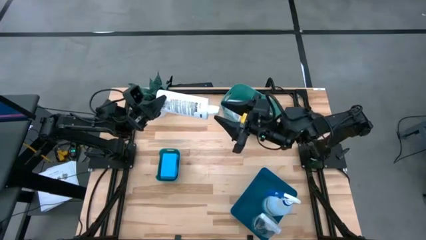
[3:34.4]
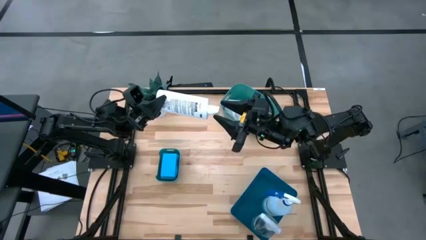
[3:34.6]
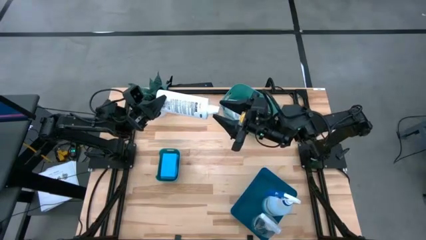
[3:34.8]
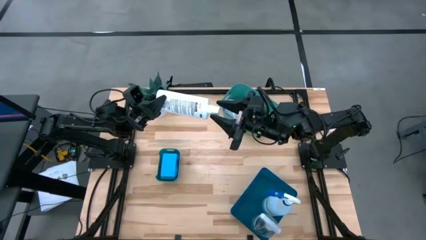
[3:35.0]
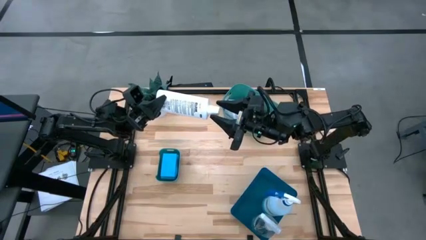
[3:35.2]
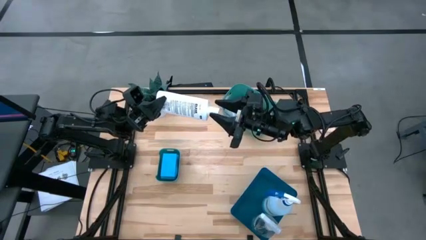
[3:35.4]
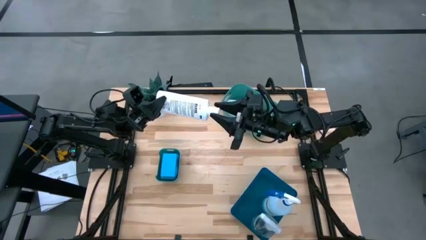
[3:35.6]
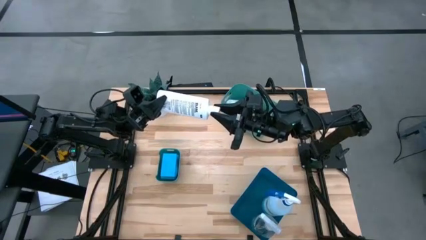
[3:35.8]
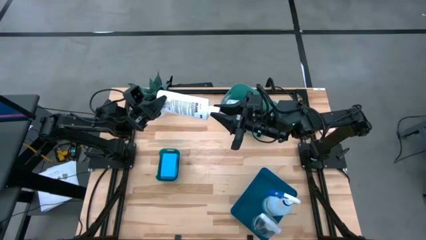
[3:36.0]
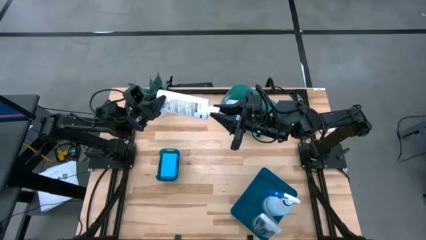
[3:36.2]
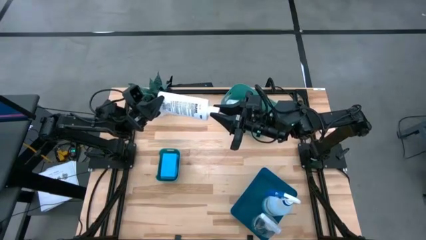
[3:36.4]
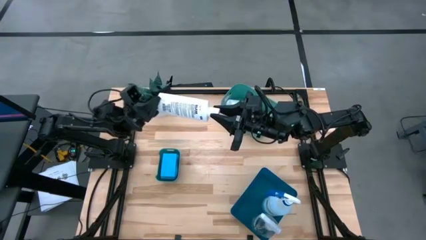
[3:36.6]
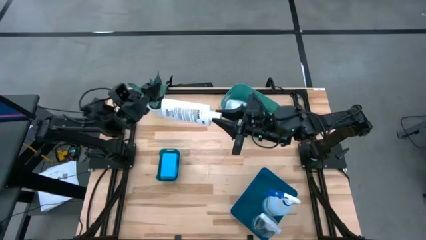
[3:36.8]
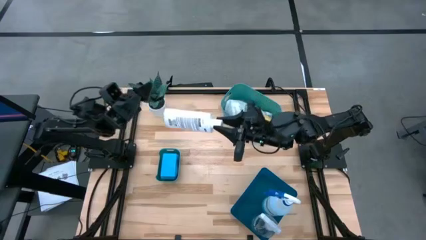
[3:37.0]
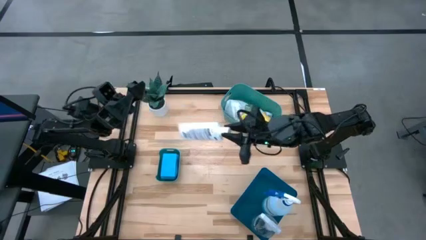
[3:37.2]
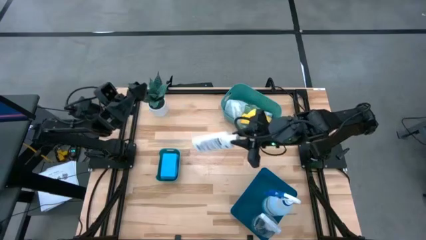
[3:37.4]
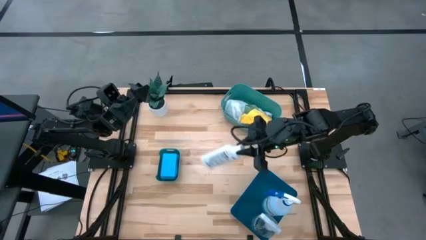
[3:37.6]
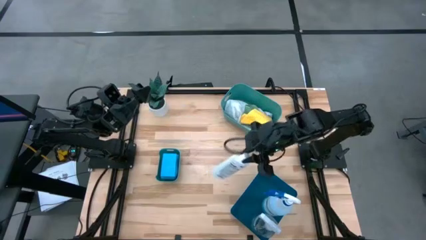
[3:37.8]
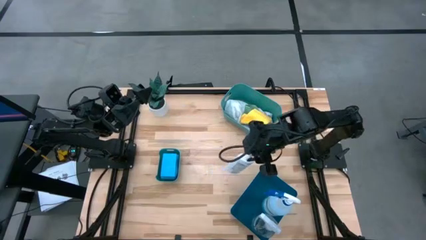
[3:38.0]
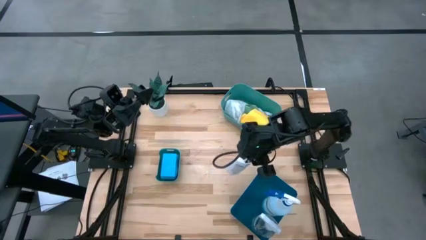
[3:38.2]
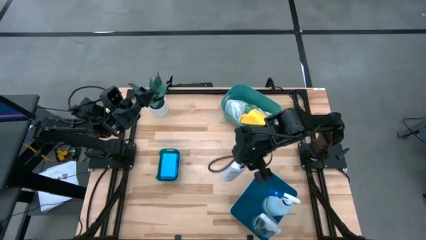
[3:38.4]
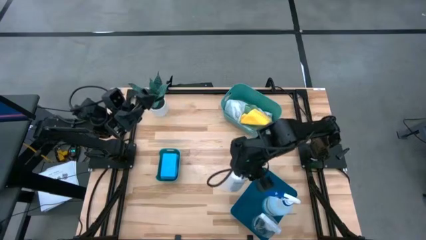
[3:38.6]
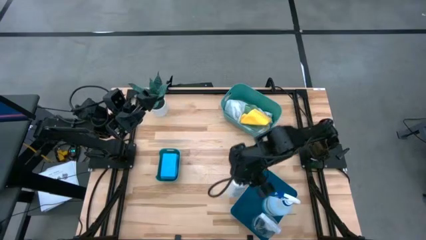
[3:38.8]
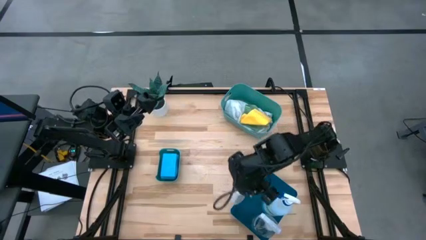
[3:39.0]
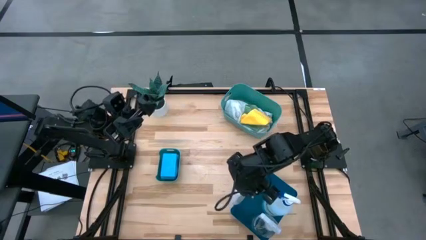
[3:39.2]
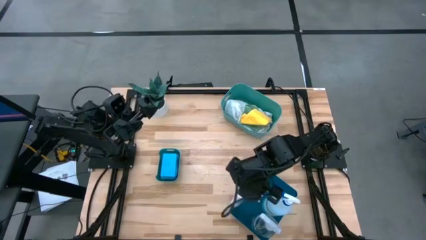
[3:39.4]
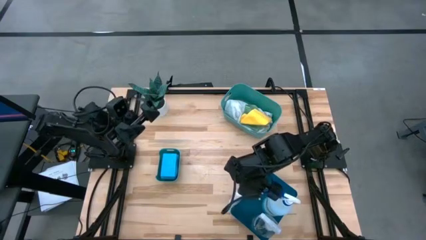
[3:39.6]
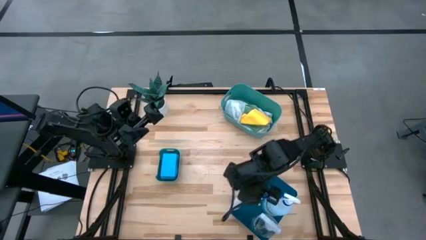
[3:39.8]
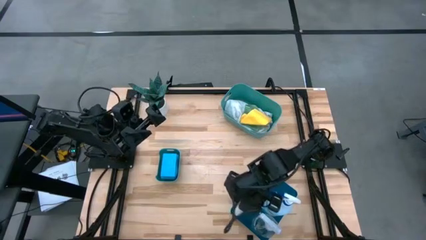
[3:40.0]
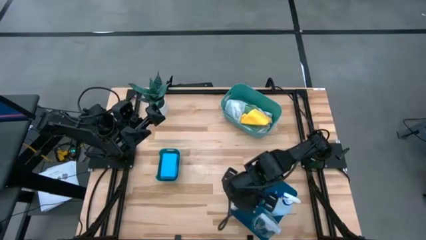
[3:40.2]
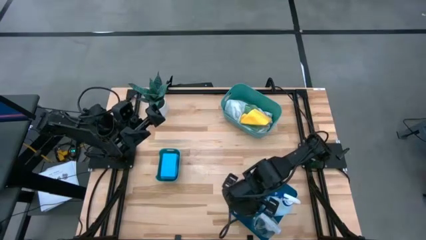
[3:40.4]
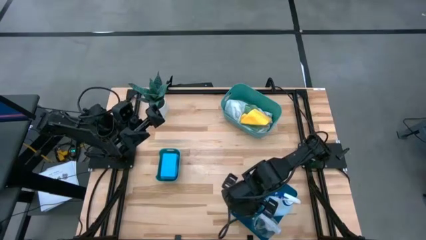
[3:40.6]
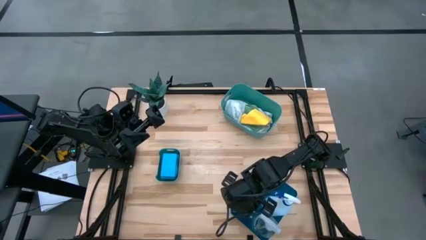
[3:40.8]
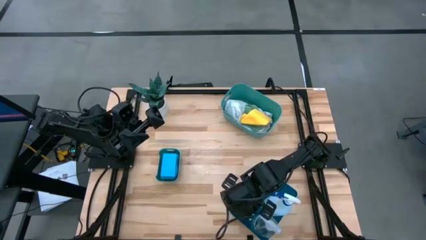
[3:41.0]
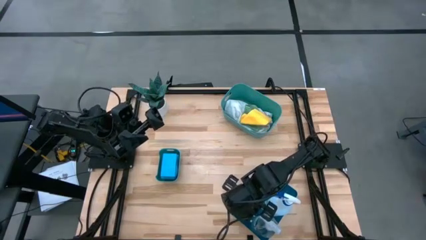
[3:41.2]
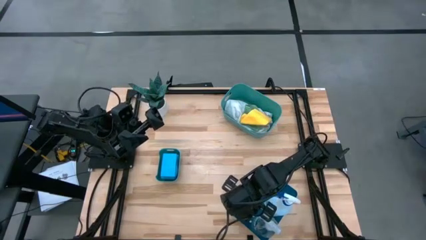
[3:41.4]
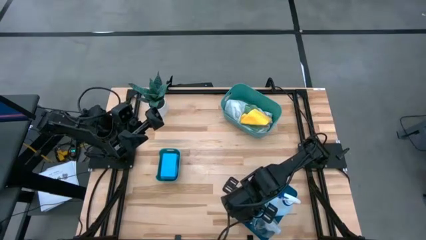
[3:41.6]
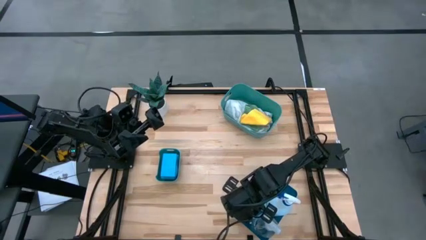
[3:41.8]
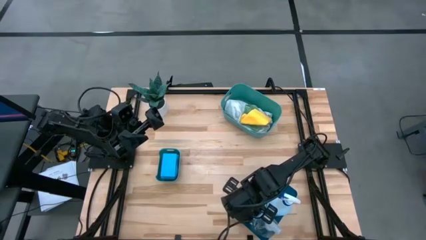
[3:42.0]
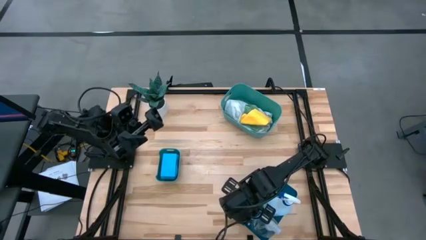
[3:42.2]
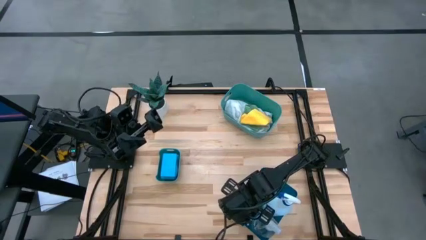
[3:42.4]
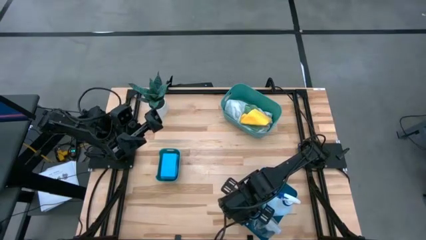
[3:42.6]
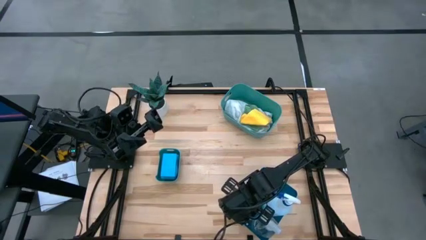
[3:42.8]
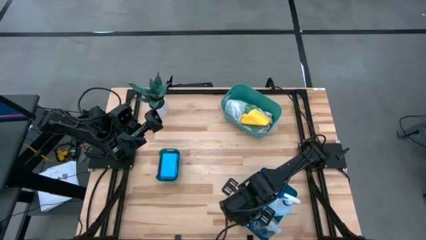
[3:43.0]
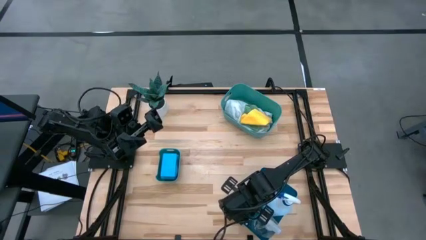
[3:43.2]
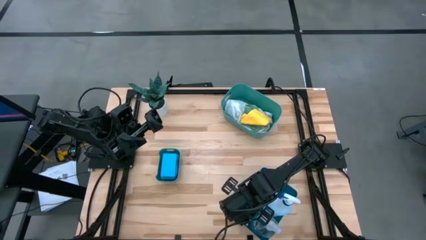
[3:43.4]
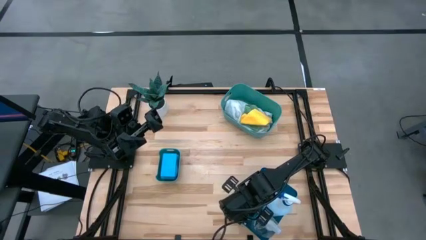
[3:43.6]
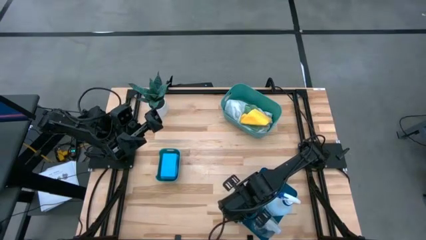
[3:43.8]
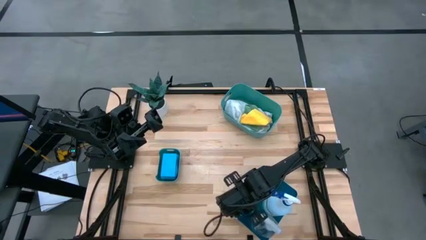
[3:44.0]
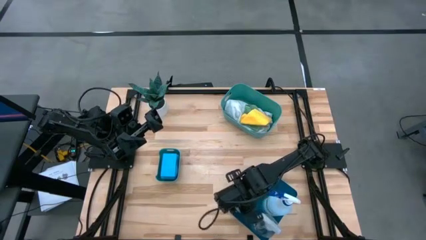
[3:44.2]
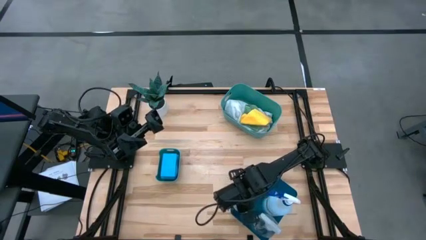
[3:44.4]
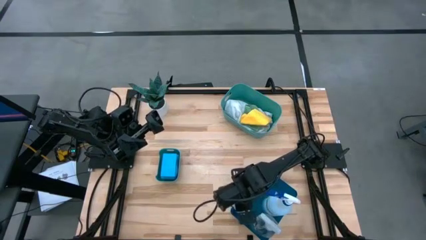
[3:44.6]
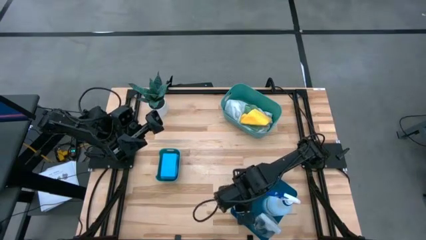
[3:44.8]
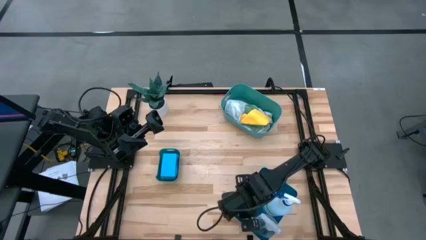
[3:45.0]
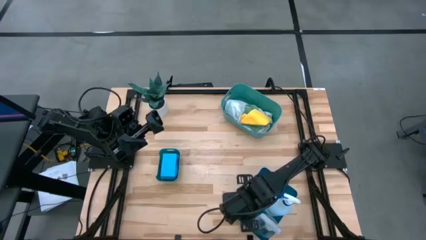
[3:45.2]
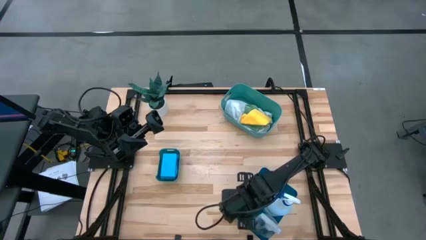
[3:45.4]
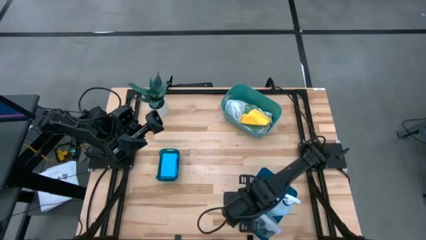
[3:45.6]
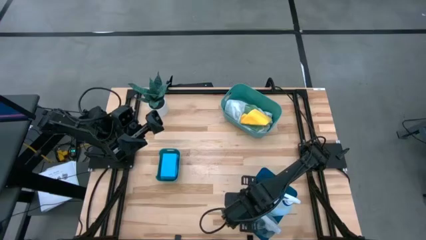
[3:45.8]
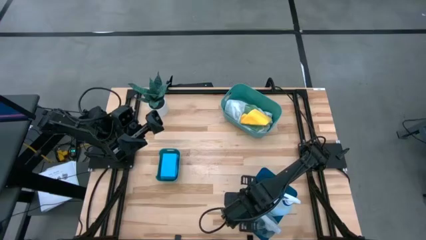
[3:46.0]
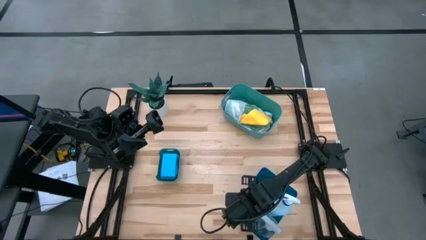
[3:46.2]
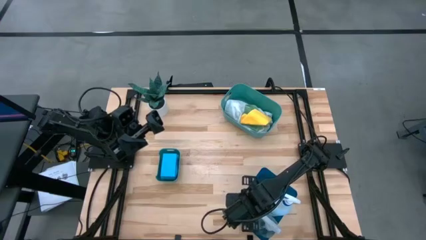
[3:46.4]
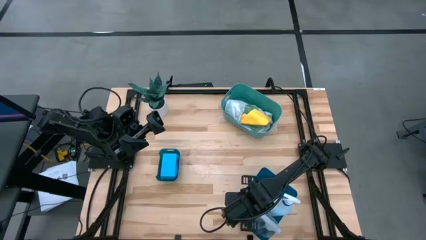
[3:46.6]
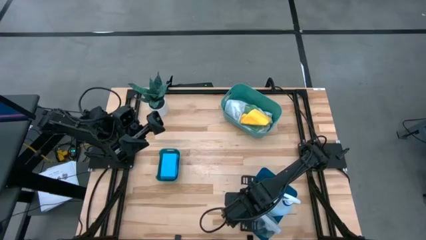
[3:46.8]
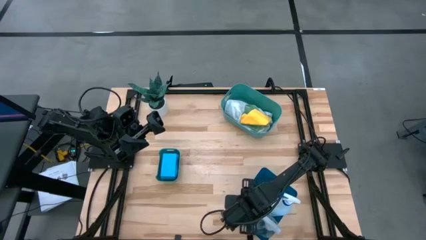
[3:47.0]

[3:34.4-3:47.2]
Task: Pick & Place Kitchen Items
Put the white glass cleaner bottle into the blue bin
